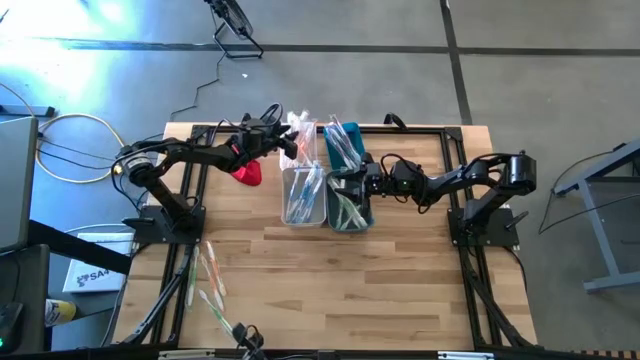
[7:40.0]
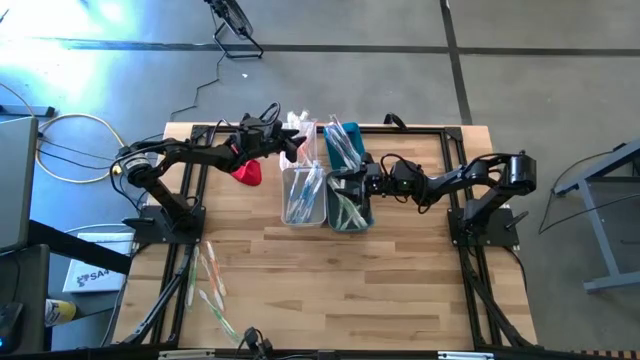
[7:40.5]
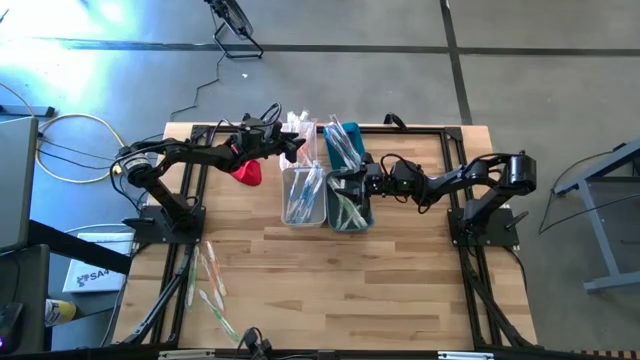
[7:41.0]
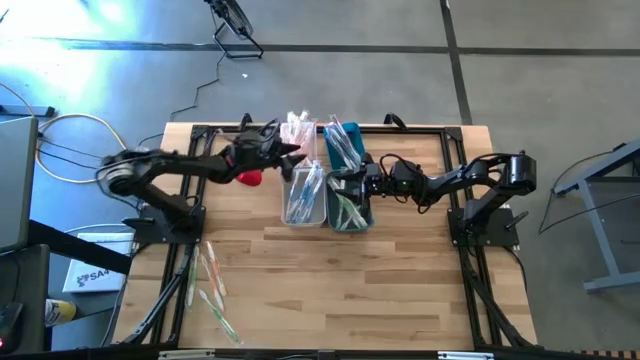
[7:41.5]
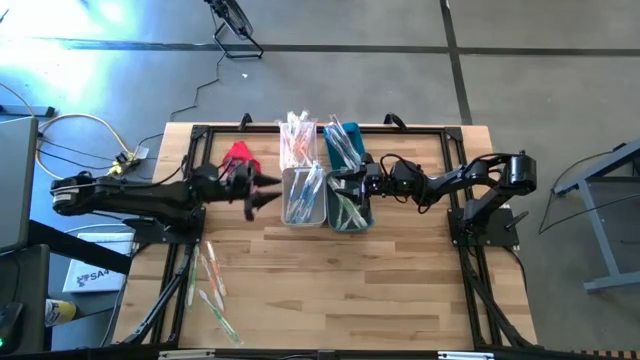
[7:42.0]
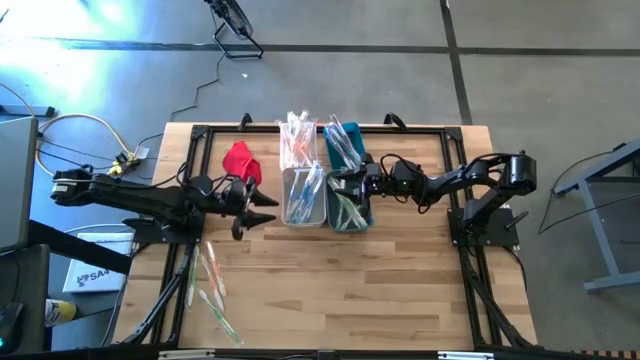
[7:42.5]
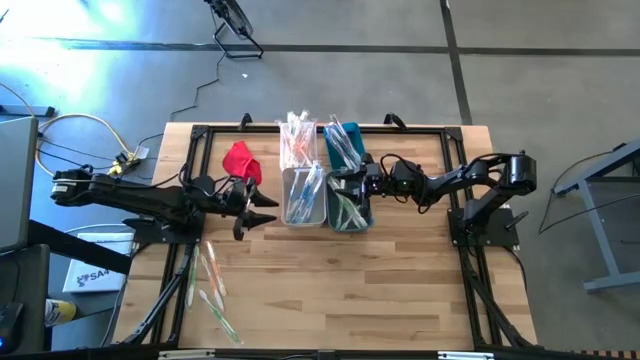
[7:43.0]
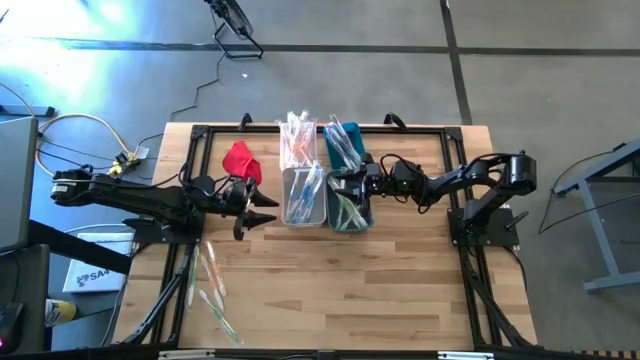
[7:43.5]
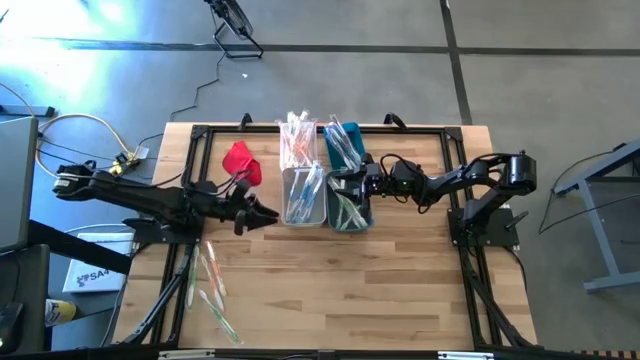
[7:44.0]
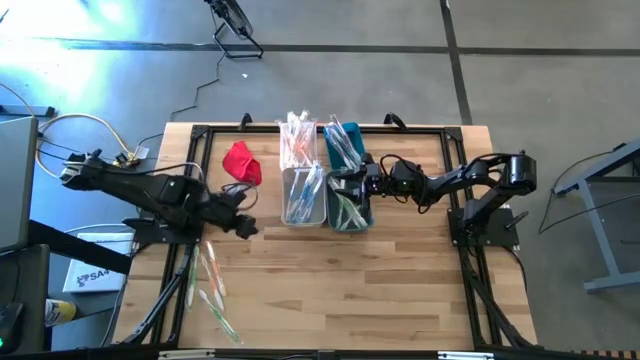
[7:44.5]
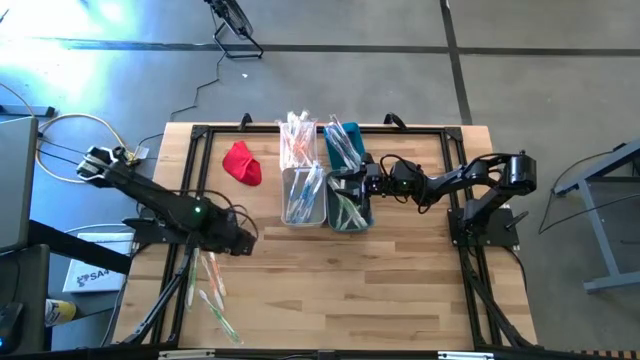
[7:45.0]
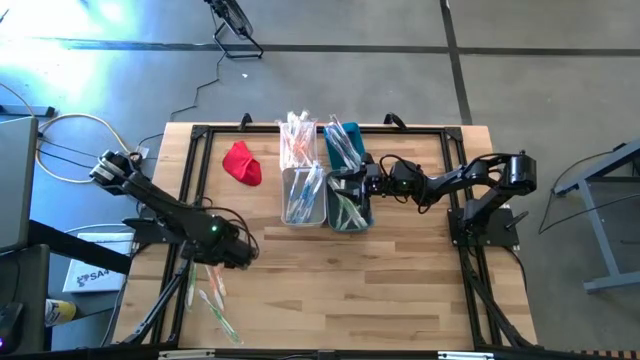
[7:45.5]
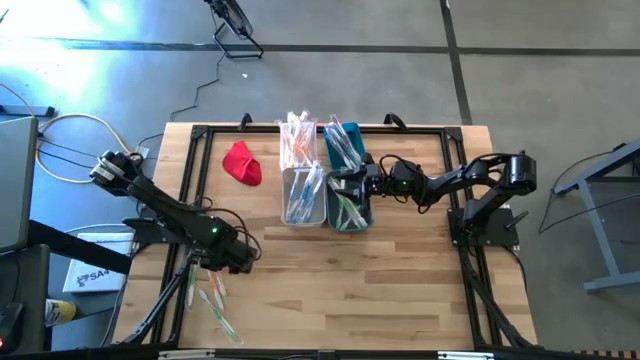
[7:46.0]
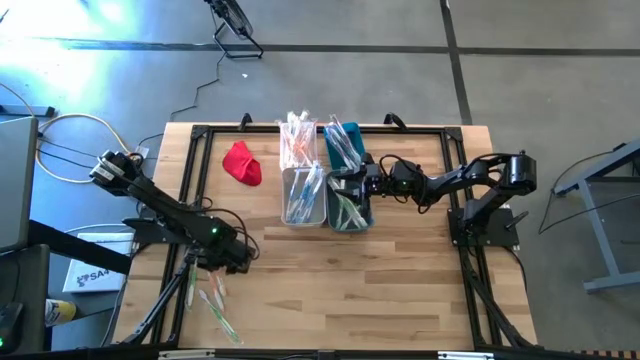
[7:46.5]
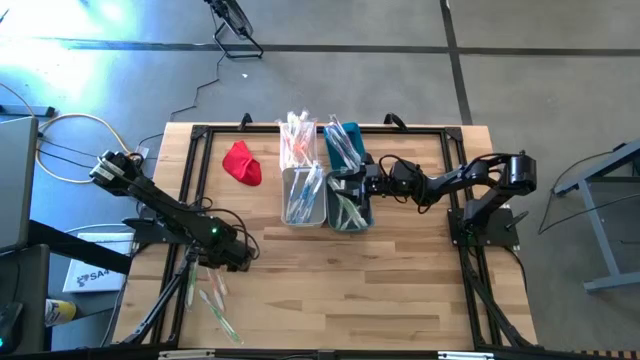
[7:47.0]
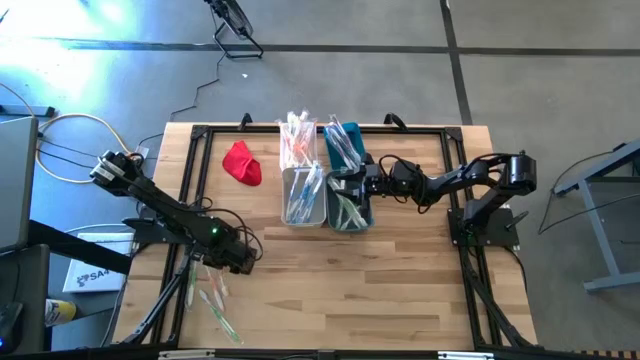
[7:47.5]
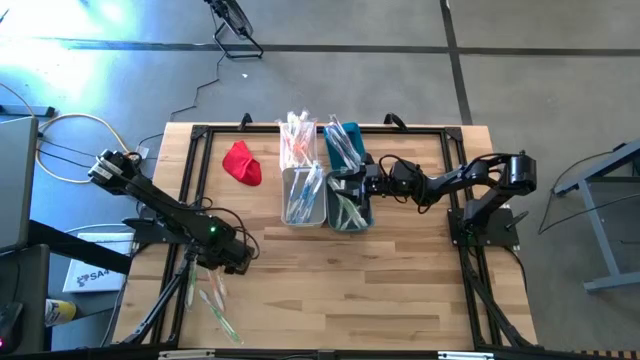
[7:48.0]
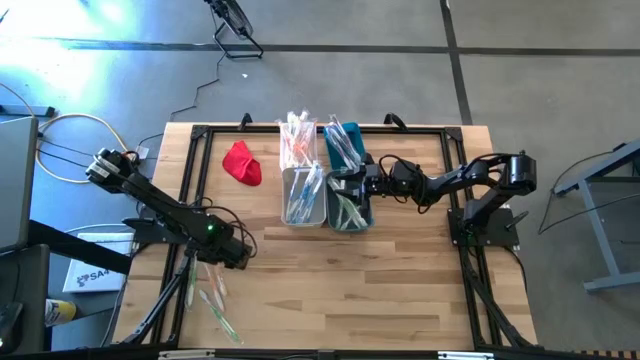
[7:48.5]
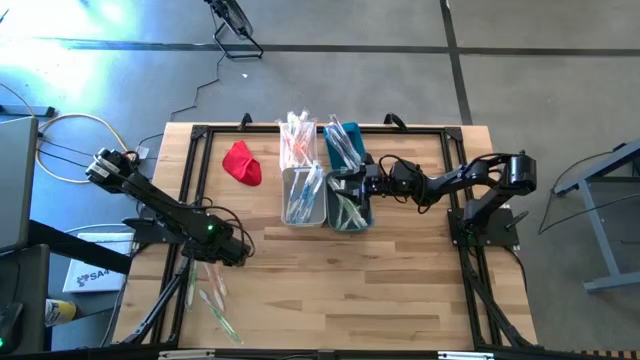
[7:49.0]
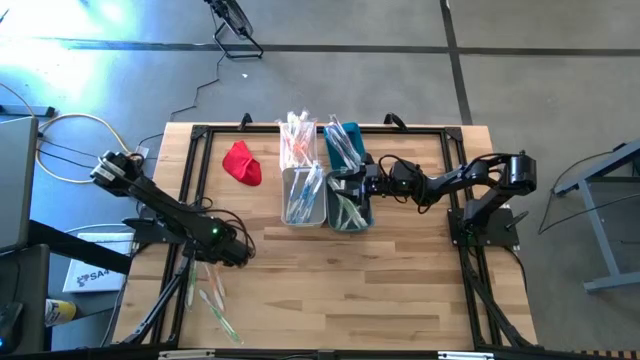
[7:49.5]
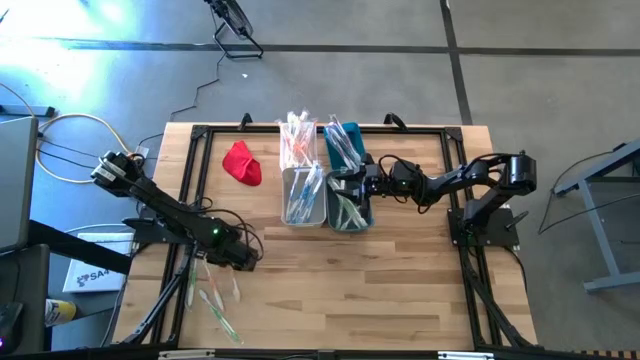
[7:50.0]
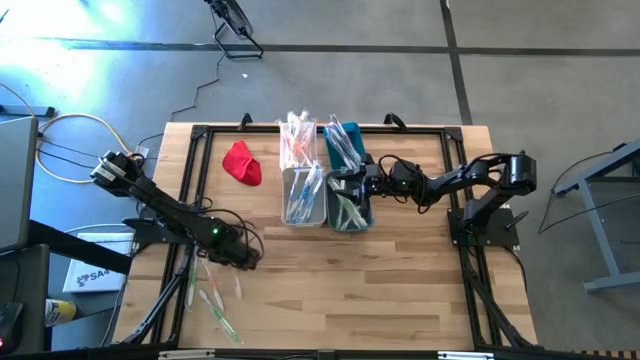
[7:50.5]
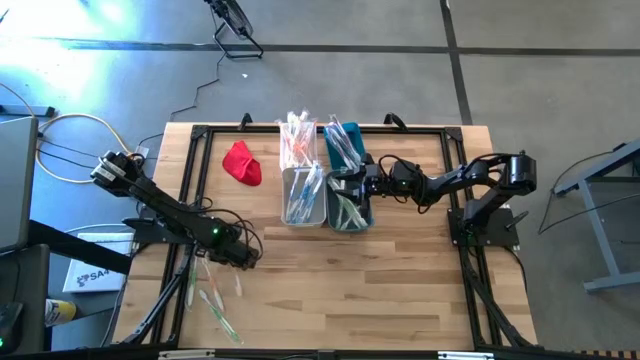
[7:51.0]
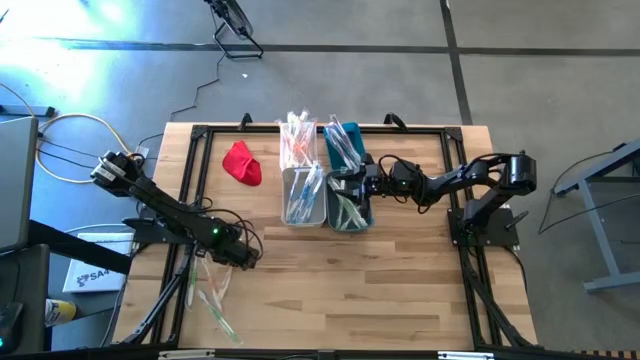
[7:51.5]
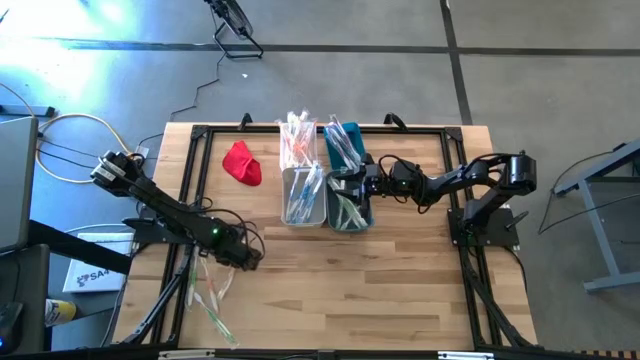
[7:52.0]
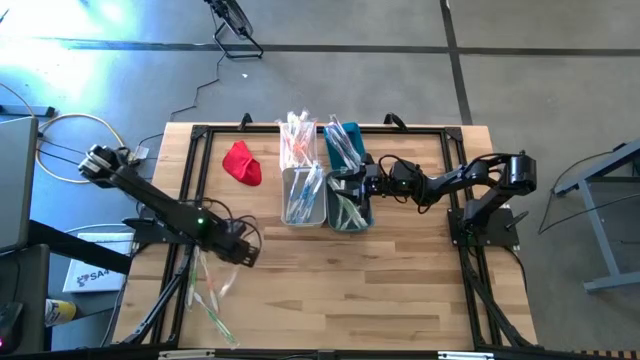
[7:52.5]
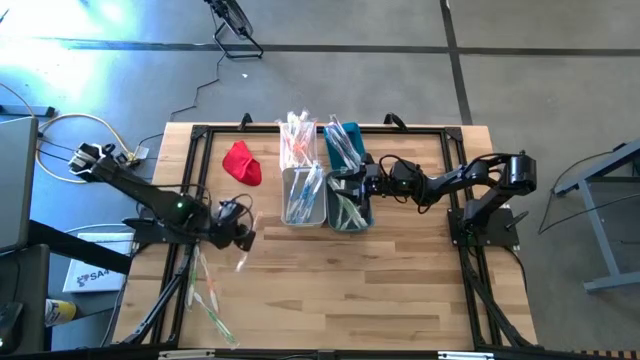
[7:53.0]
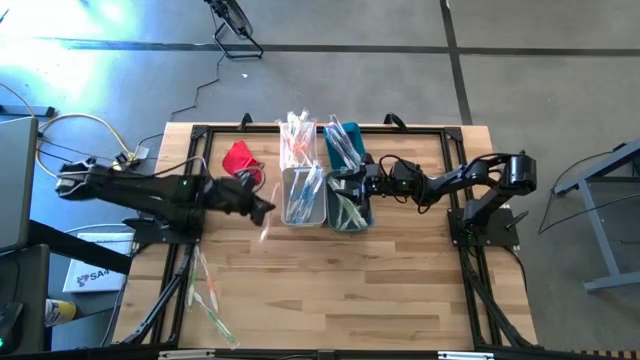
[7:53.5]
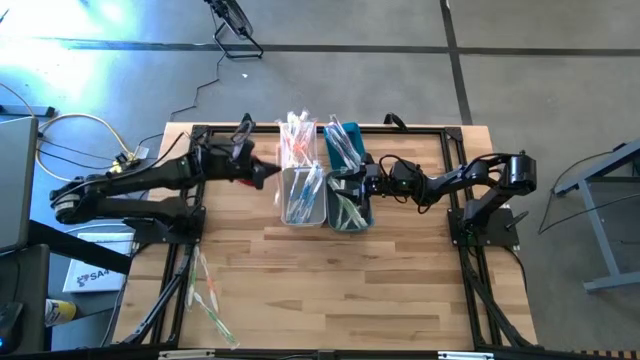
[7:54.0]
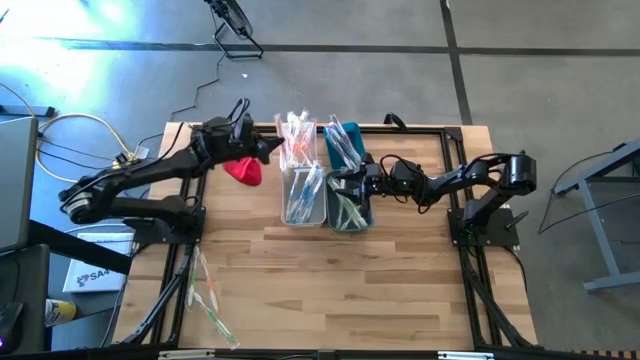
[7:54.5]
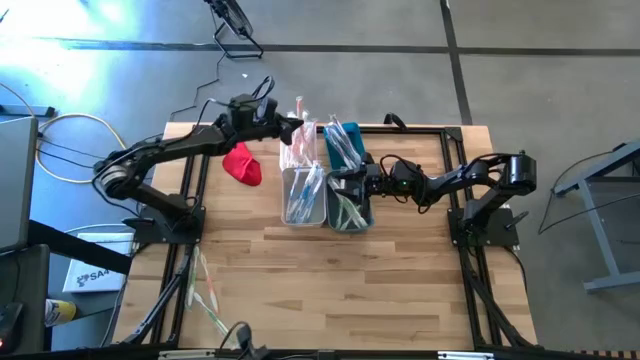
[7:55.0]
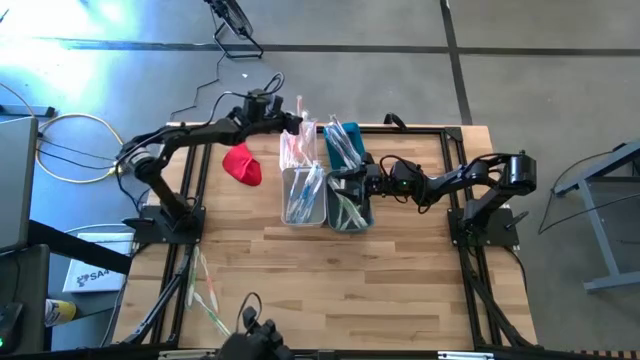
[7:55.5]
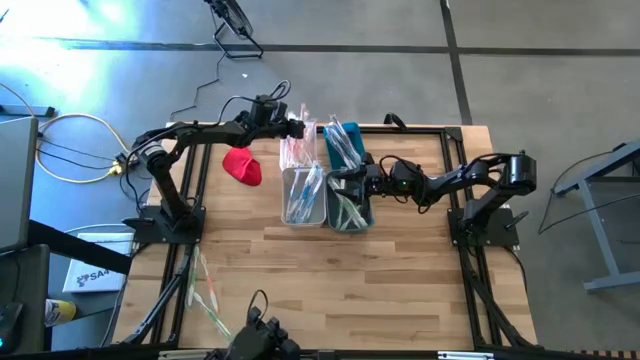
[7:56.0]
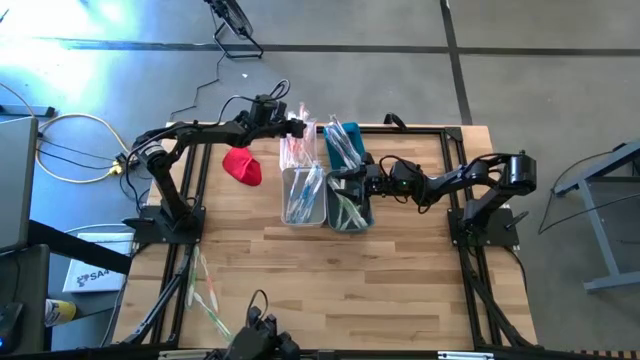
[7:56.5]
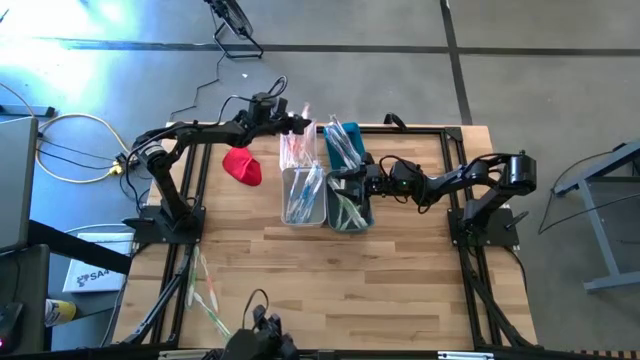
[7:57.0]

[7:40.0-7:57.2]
Task: Pick & Place Toothbrushes
Put the orange toothbrush into the transparent bin
